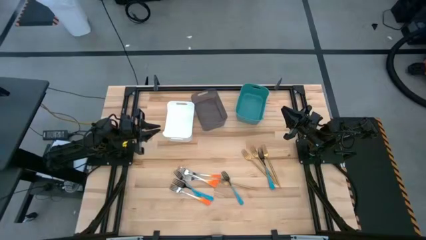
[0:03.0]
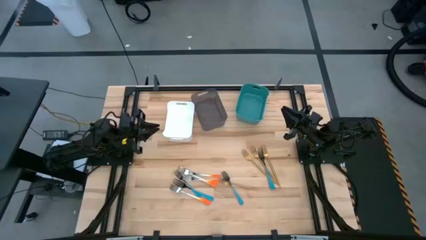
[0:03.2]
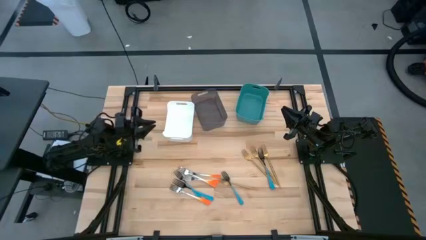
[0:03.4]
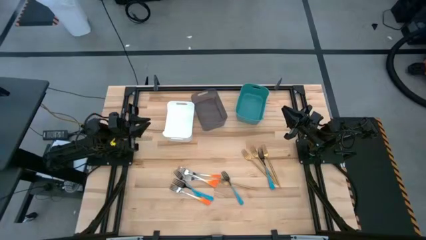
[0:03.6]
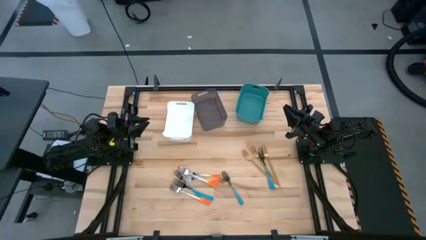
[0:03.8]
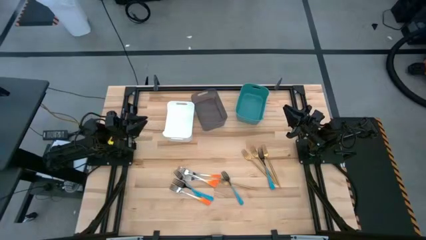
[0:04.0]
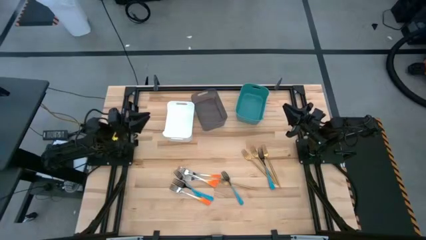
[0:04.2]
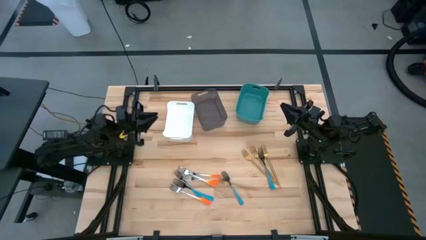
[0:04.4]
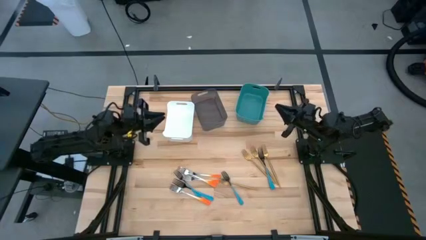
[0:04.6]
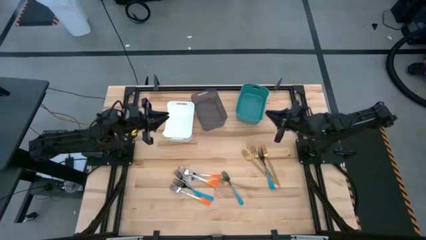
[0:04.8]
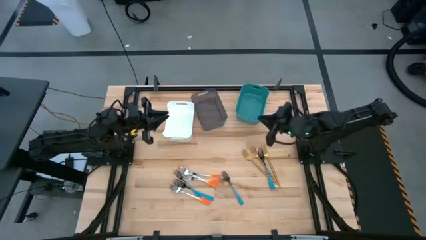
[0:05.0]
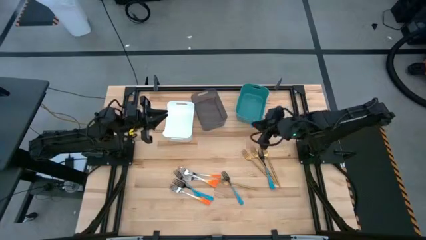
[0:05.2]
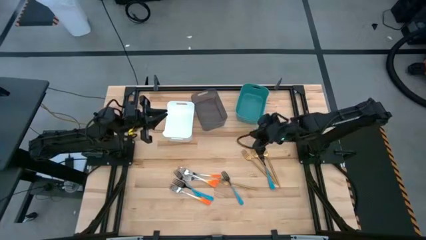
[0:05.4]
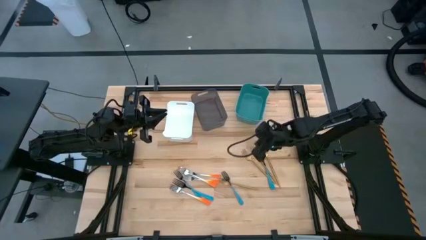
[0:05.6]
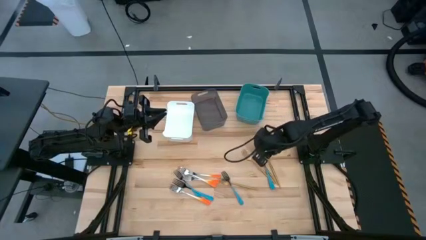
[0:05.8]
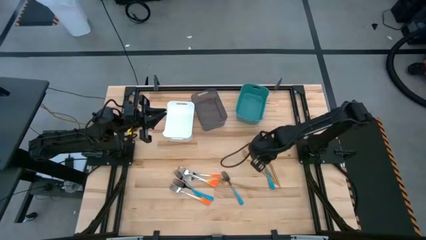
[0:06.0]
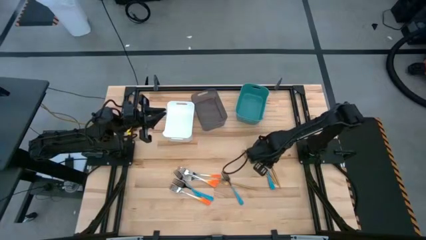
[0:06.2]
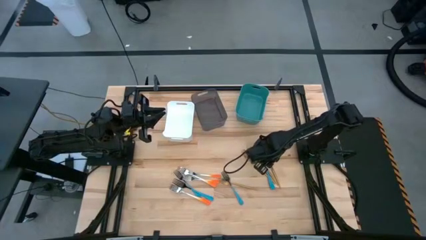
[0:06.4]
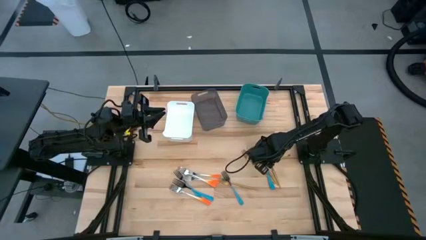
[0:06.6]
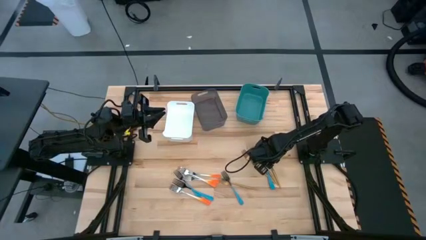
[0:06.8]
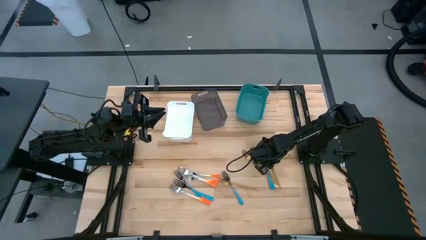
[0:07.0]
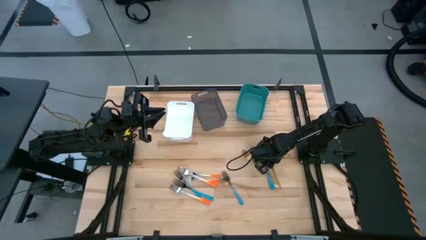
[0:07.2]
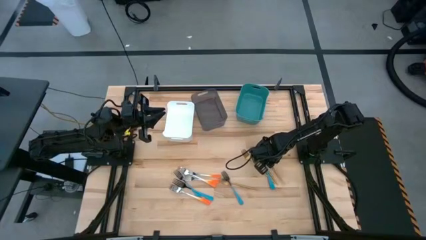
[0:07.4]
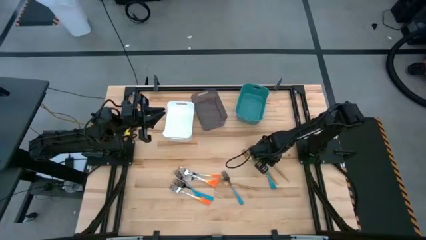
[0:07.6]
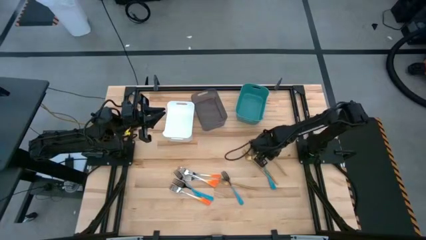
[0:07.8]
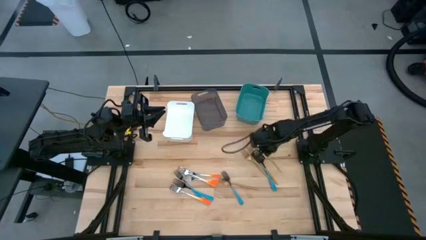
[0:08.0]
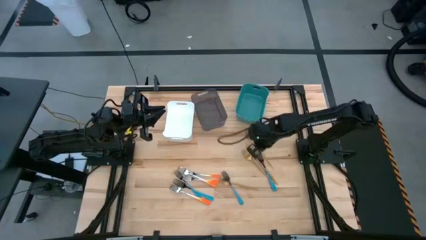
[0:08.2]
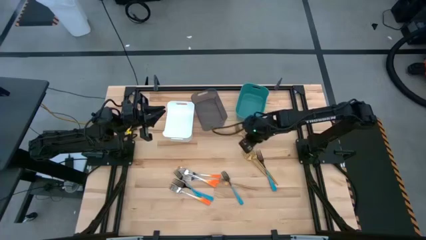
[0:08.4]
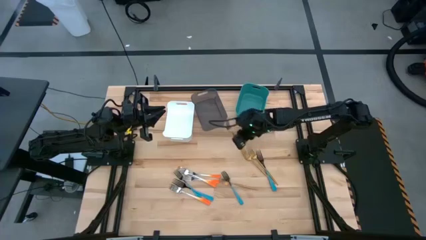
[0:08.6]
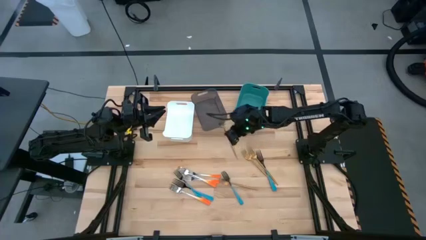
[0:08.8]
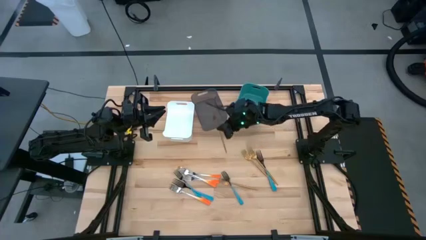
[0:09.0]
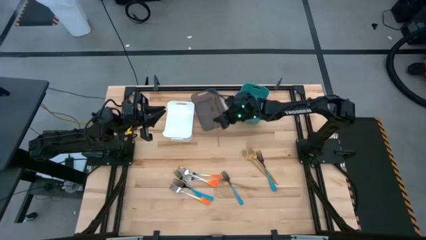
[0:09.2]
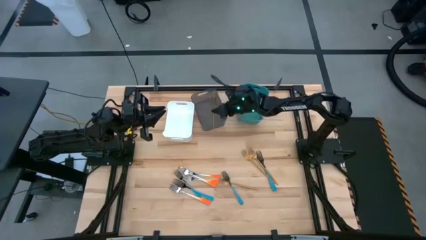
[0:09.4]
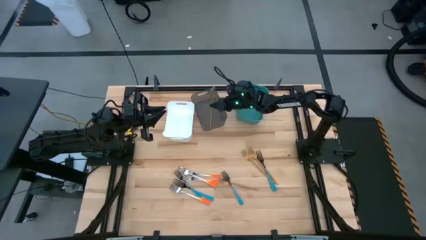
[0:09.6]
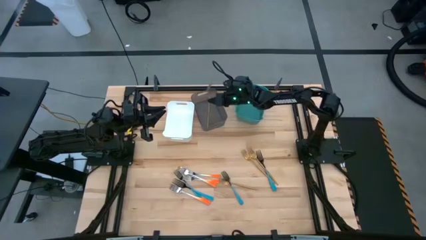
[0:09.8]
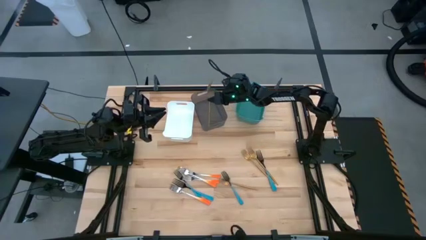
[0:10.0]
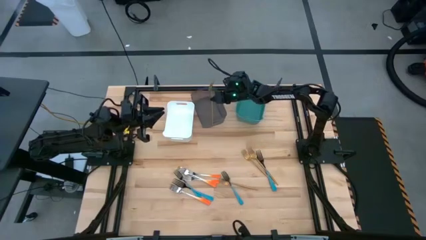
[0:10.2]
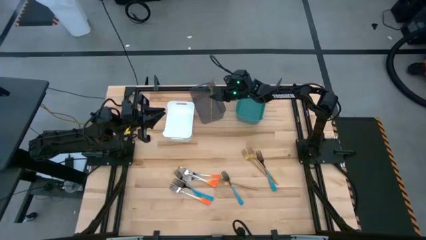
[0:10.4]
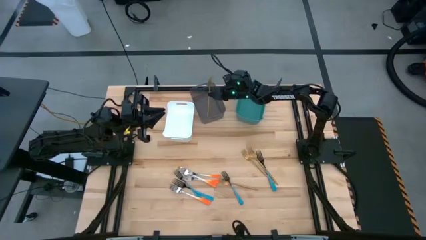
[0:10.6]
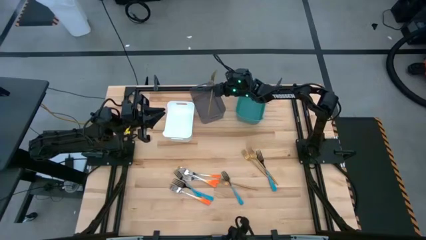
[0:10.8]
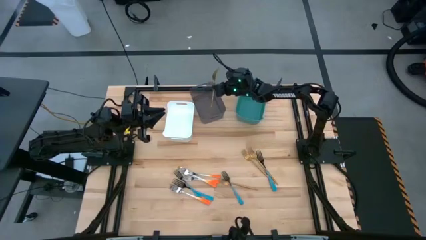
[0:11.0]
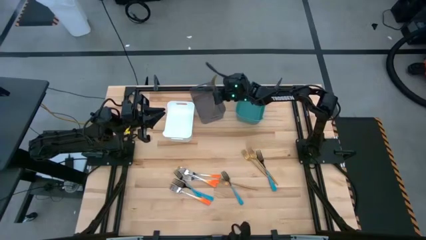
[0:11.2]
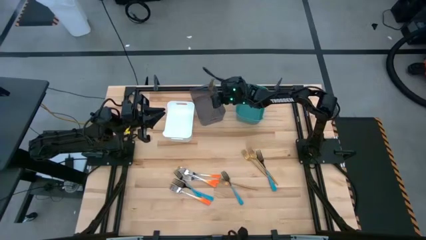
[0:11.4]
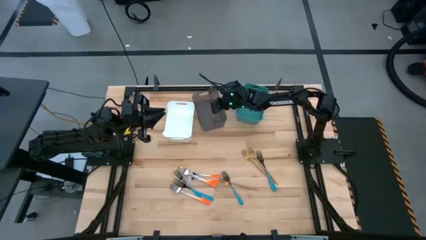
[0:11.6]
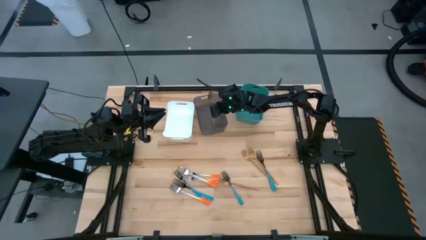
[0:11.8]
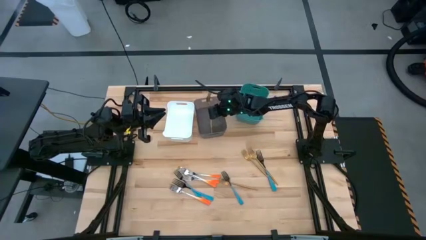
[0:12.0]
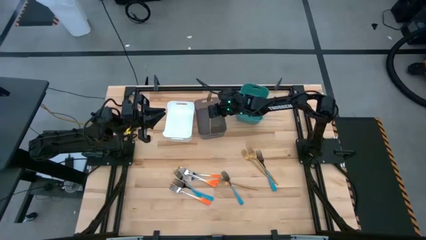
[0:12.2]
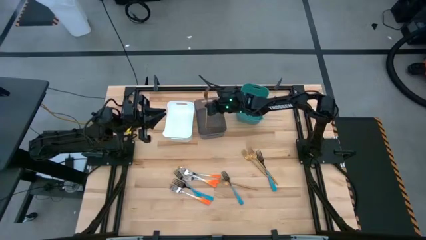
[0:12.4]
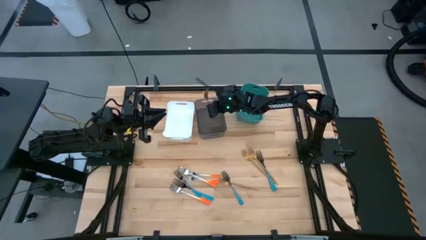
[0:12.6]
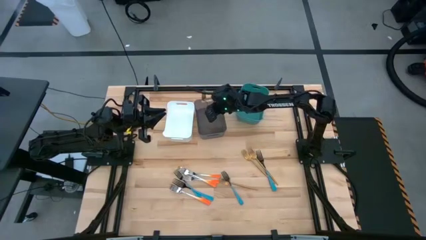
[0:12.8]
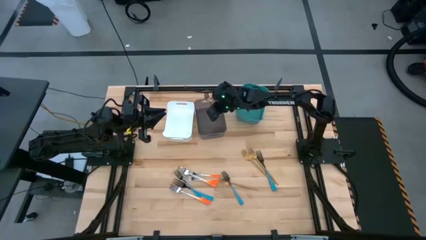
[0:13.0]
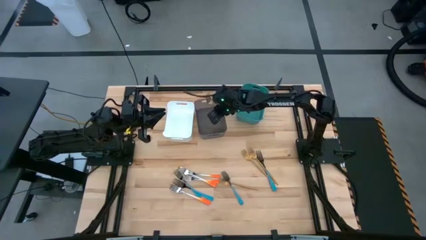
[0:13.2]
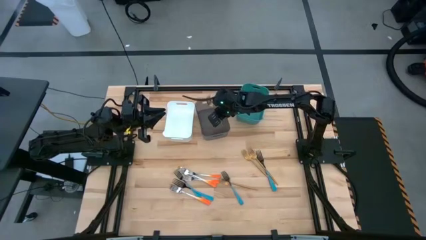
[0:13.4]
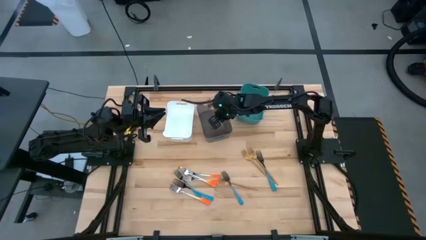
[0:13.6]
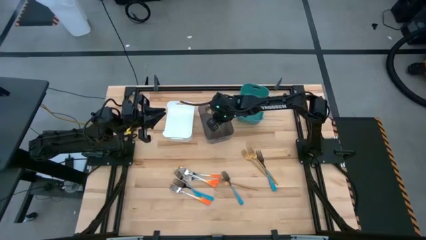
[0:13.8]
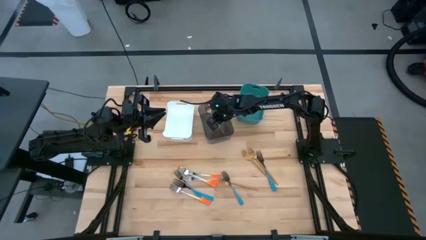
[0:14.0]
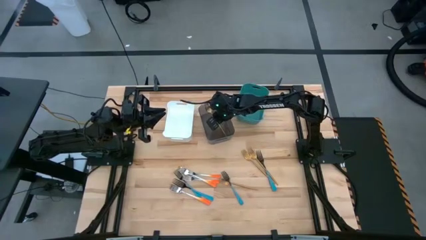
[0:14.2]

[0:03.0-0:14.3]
Task: Sort silverware by color (type)
Put the gold fork into the black bin
